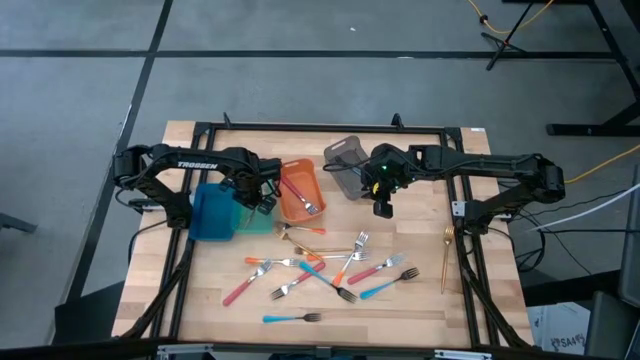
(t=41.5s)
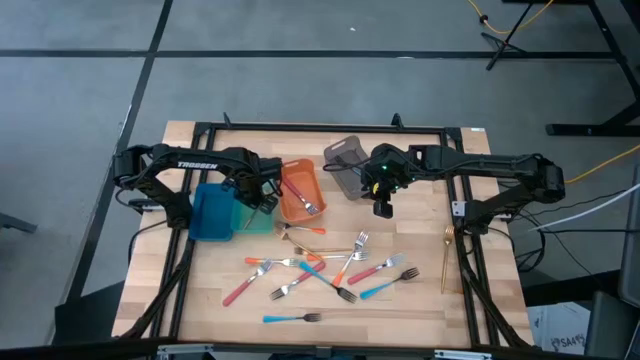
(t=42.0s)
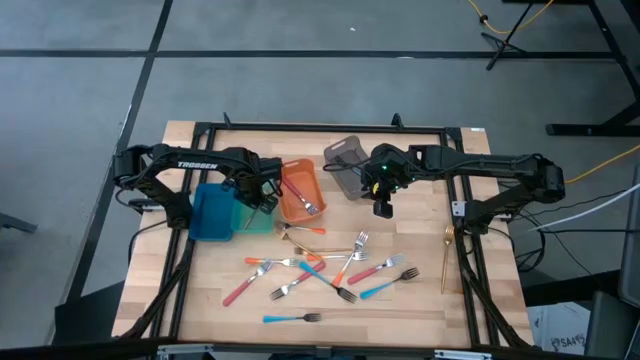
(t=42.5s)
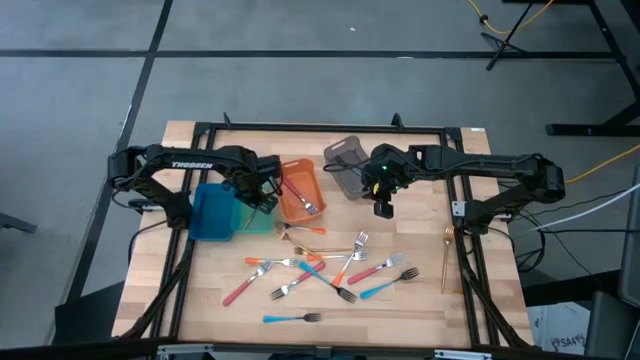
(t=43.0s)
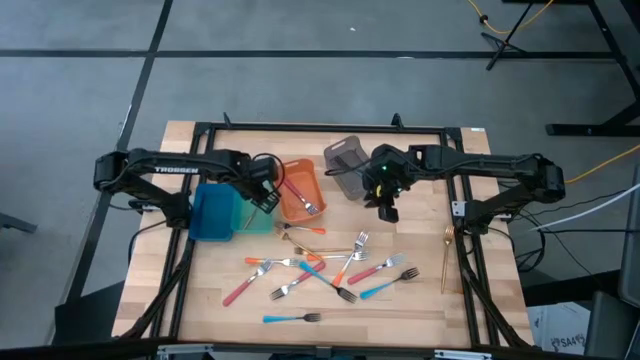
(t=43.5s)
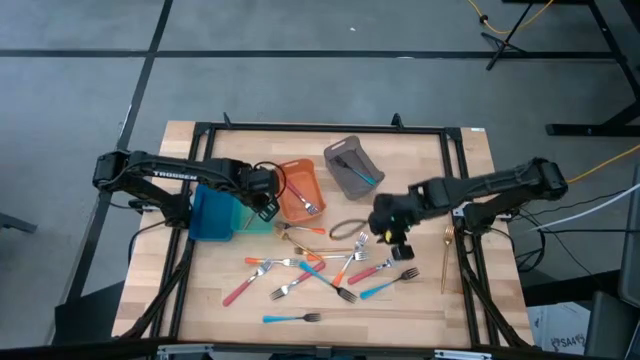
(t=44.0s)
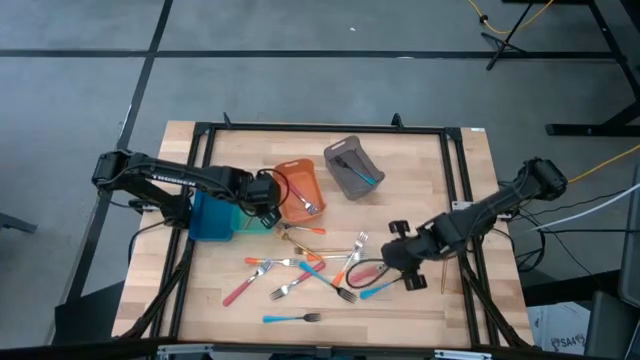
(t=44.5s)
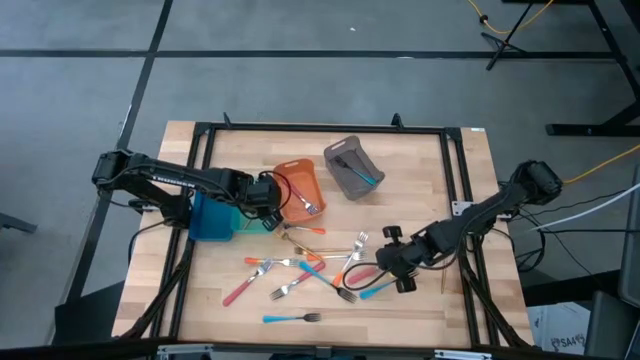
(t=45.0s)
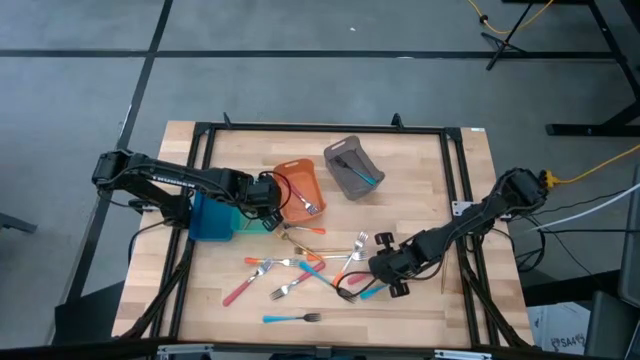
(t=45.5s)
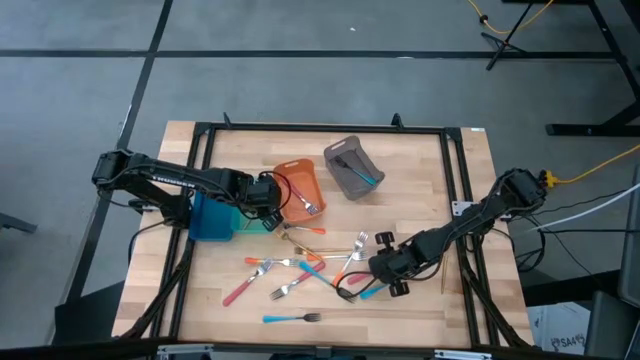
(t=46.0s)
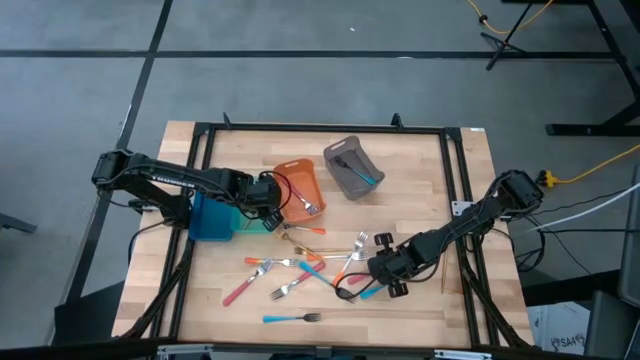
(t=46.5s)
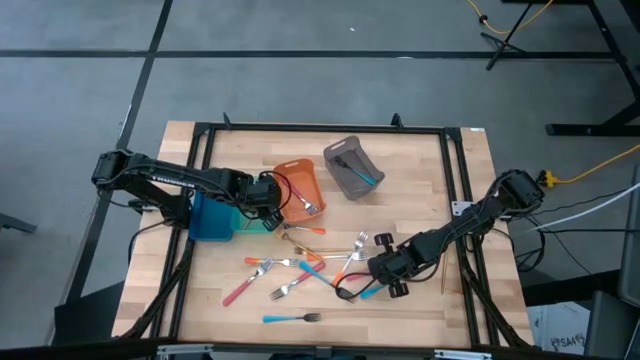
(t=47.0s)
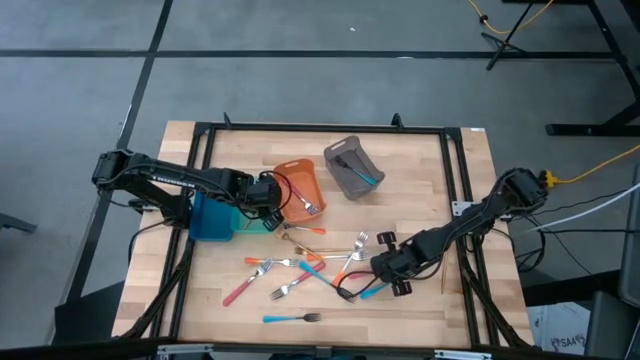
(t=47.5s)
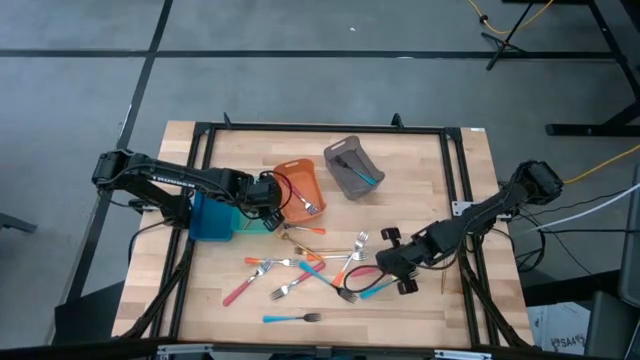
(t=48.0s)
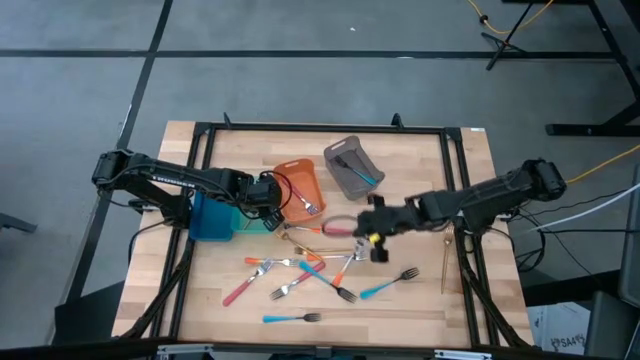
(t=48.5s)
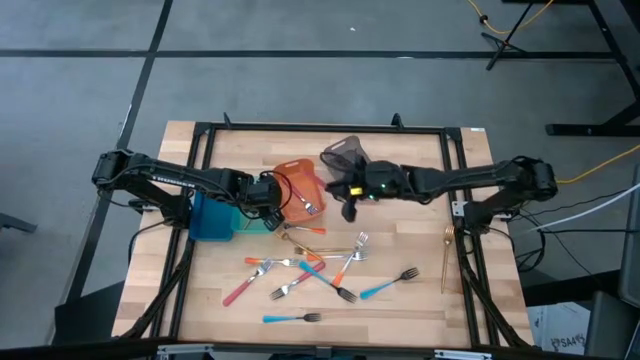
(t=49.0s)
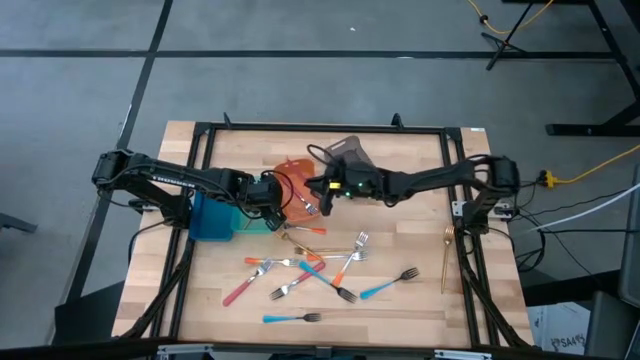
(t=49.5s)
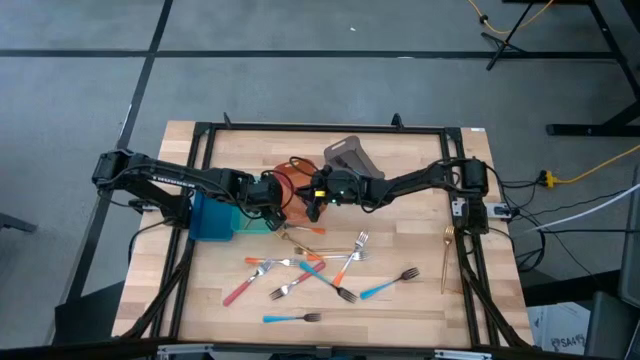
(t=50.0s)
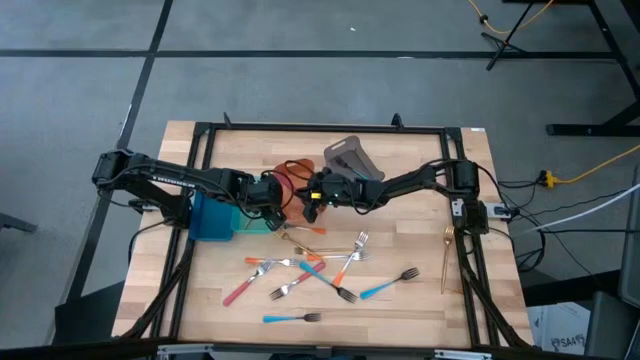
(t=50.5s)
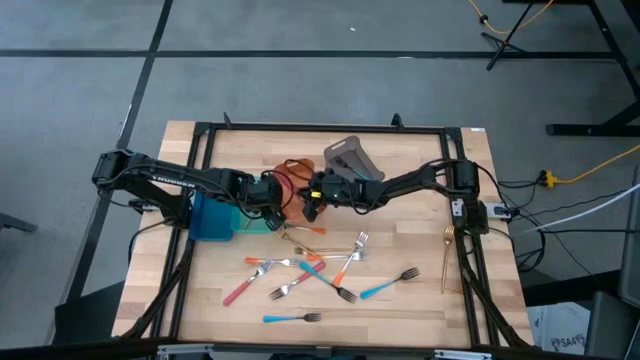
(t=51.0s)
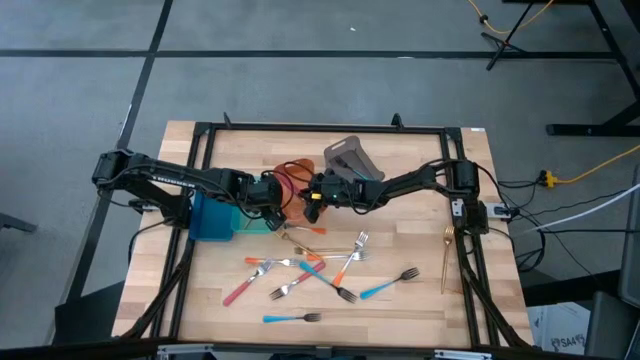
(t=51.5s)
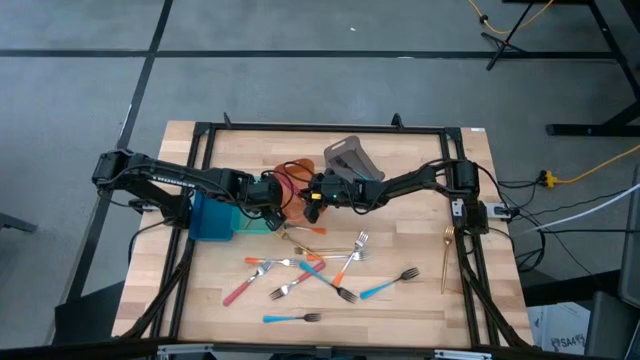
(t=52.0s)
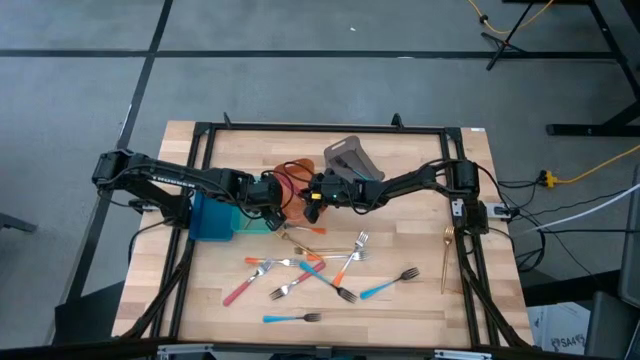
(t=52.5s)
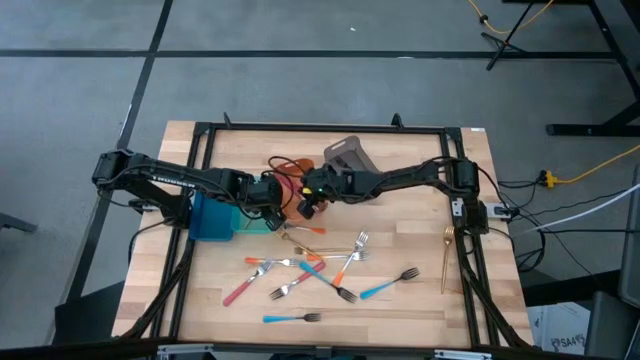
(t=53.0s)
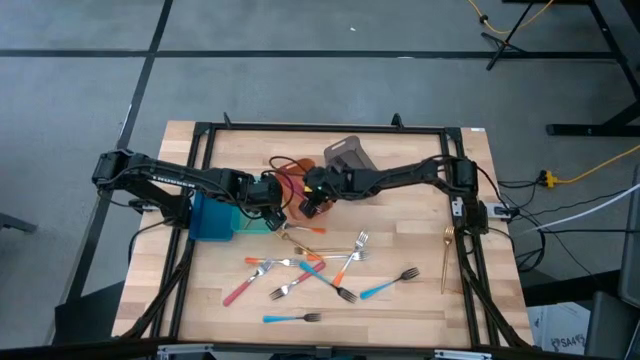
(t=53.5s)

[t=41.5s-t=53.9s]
Task: Sort silverware by color (type)
Put the pink fork into the orange bin

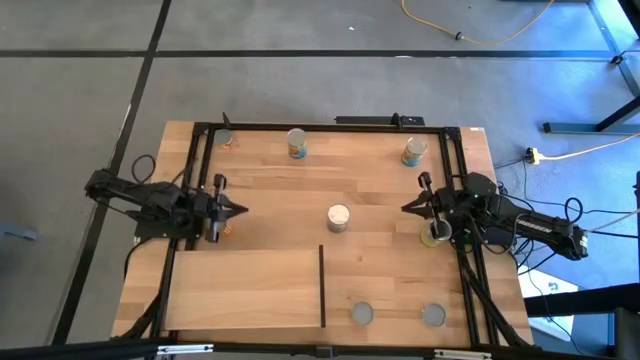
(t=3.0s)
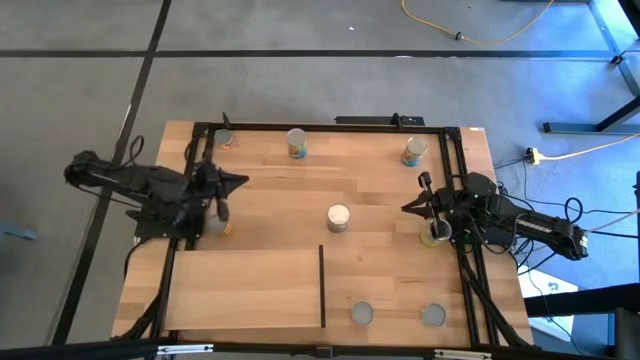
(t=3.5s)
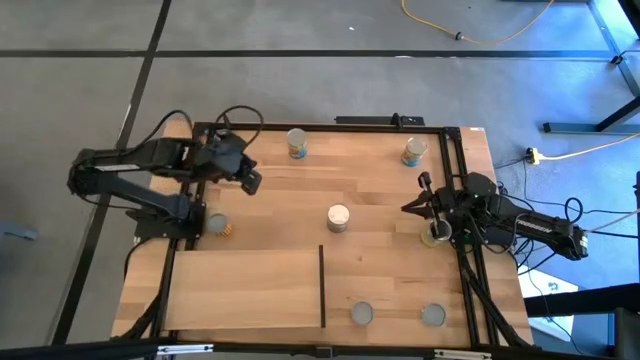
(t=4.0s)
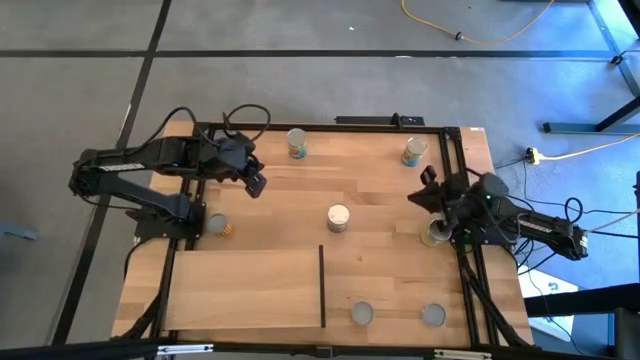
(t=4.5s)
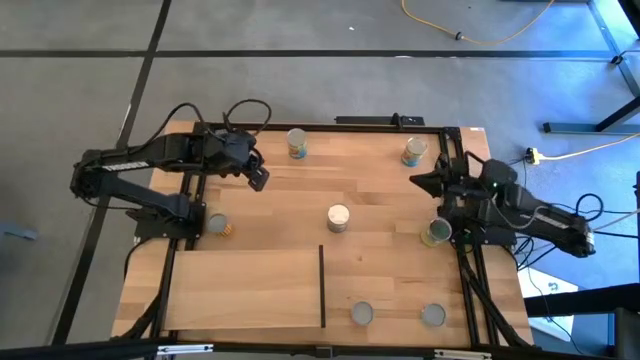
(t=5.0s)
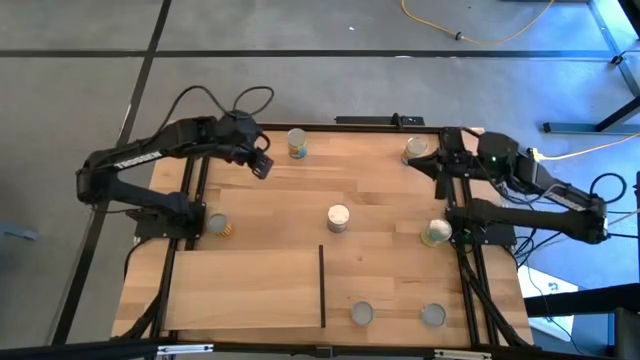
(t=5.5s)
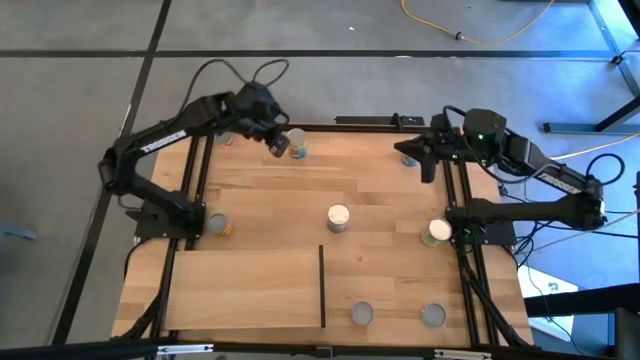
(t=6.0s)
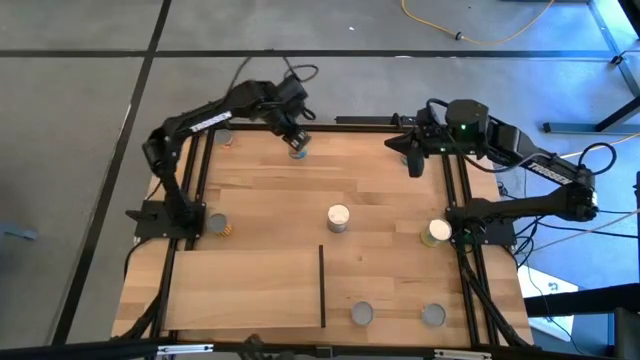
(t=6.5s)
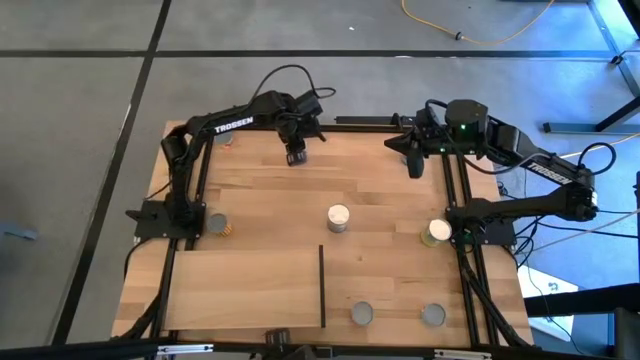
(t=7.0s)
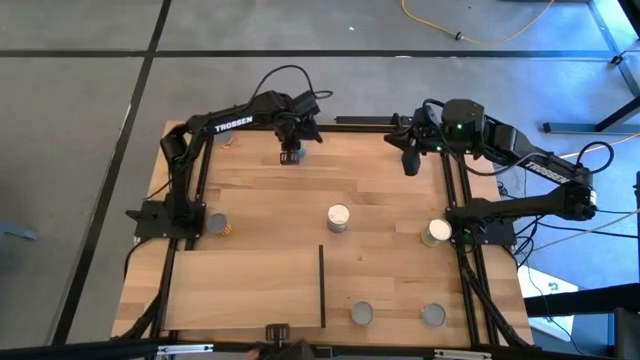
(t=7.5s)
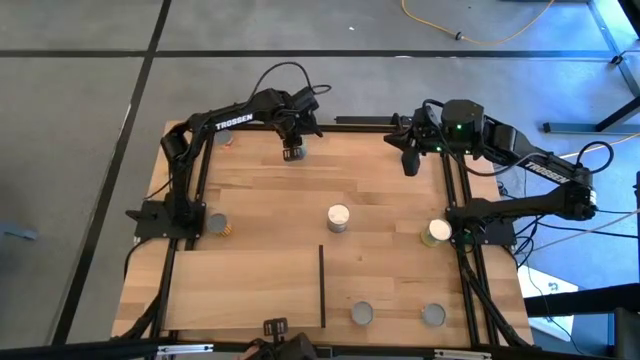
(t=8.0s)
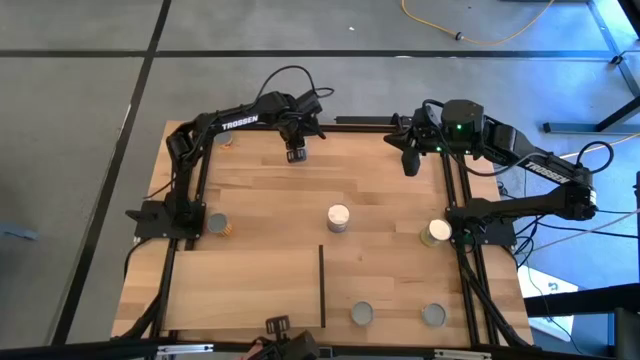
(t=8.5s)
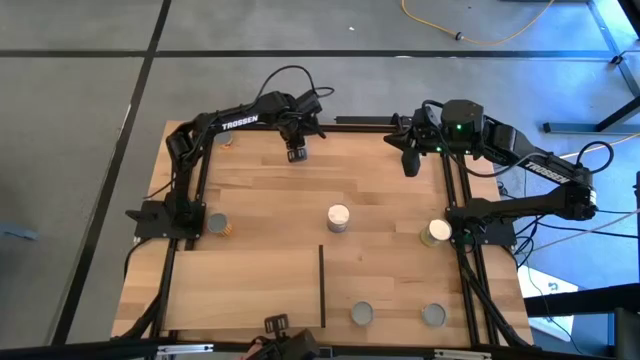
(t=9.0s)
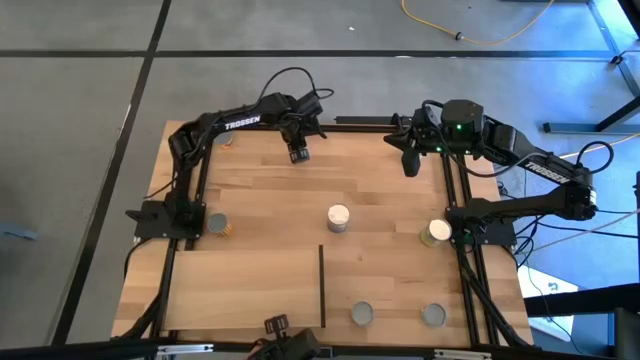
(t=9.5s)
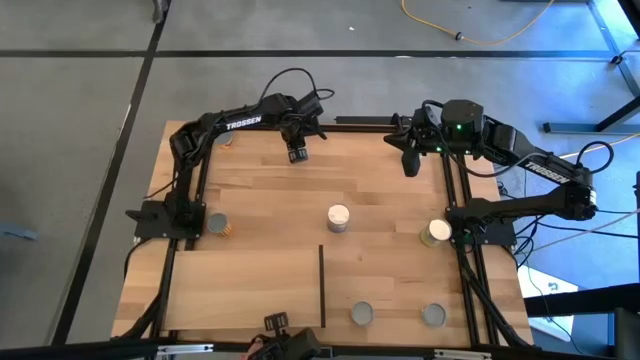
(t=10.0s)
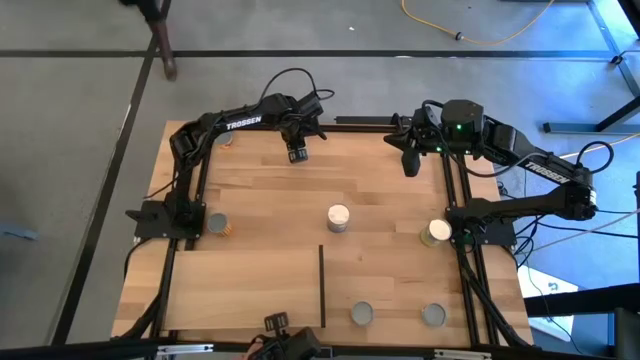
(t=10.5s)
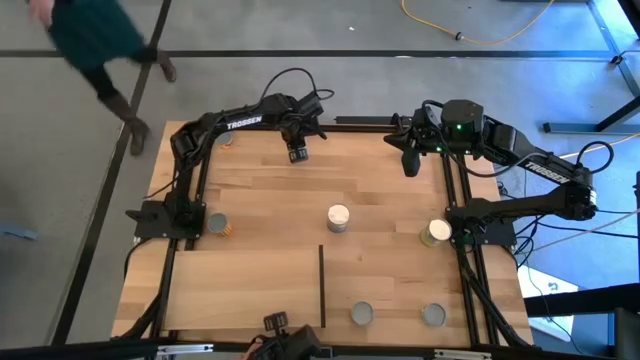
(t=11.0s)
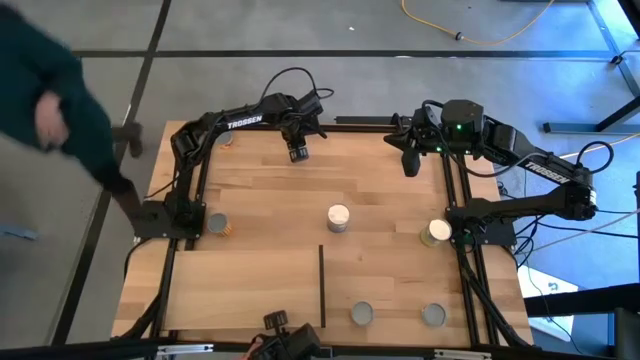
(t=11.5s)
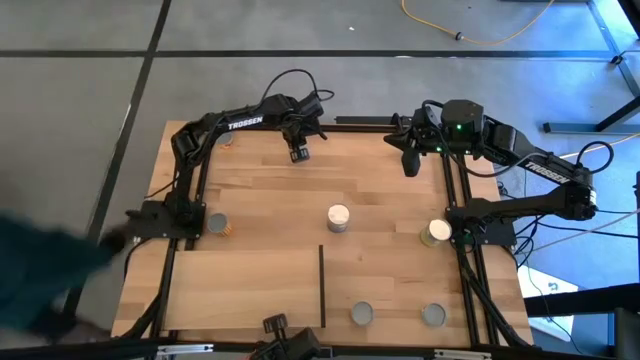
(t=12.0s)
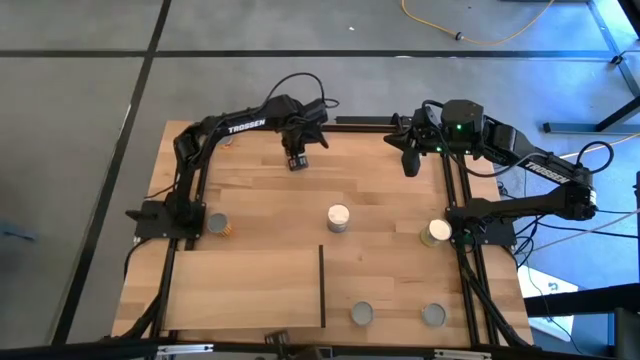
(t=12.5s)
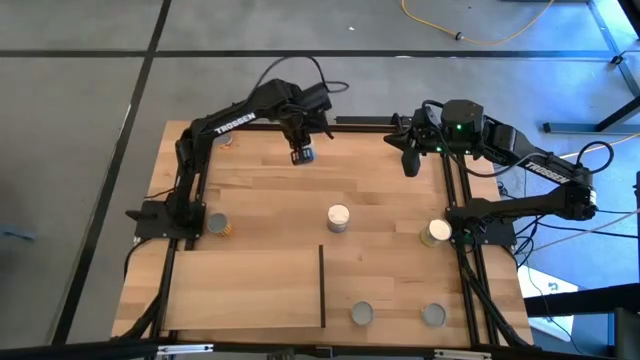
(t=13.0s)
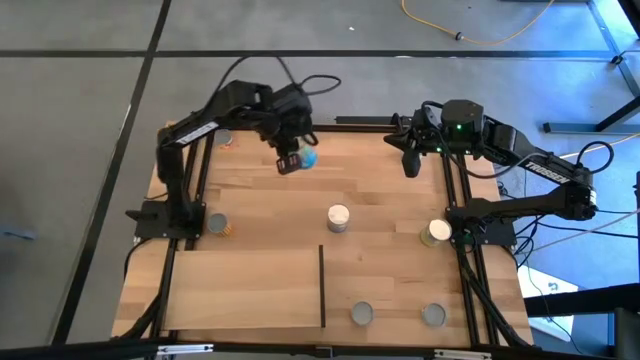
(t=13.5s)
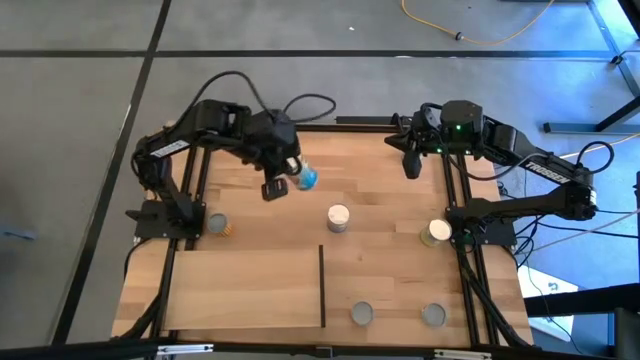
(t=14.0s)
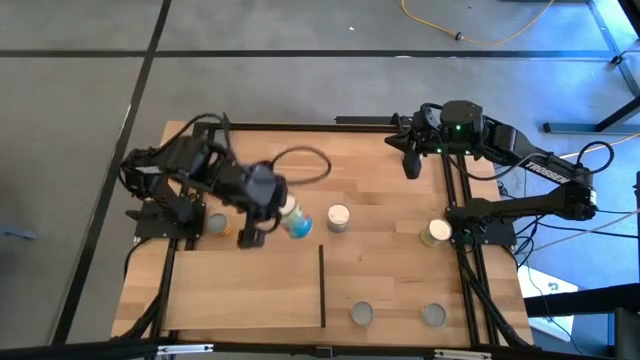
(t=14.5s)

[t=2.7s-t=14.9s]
Task: Pick and place cans onto a shelf
Put the left canned tomato on the shelf
